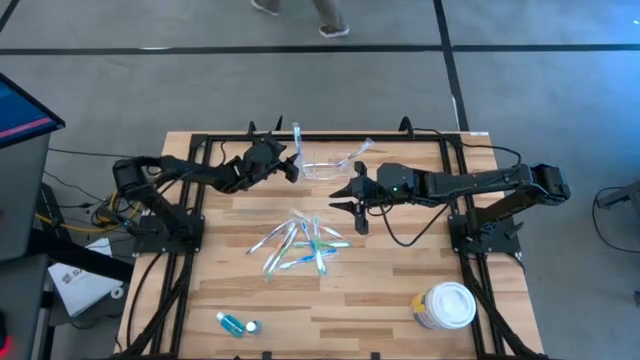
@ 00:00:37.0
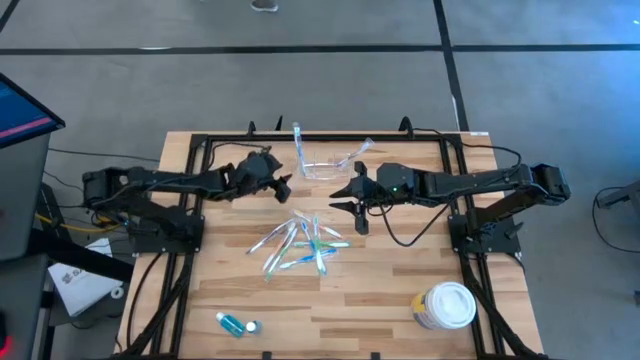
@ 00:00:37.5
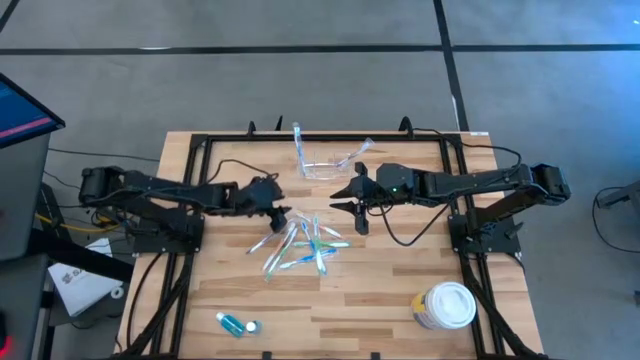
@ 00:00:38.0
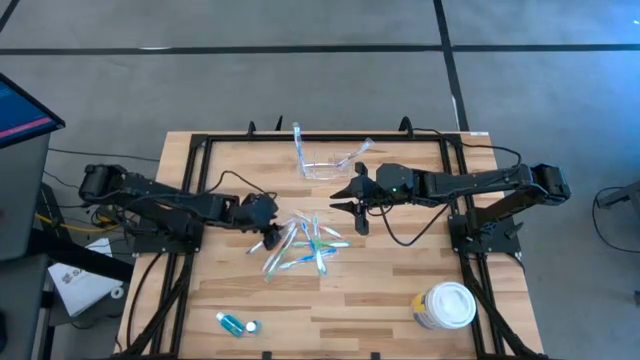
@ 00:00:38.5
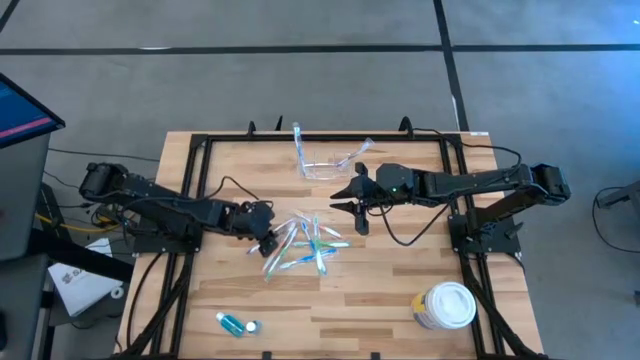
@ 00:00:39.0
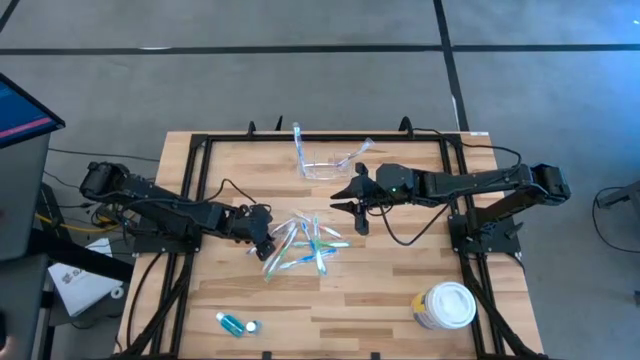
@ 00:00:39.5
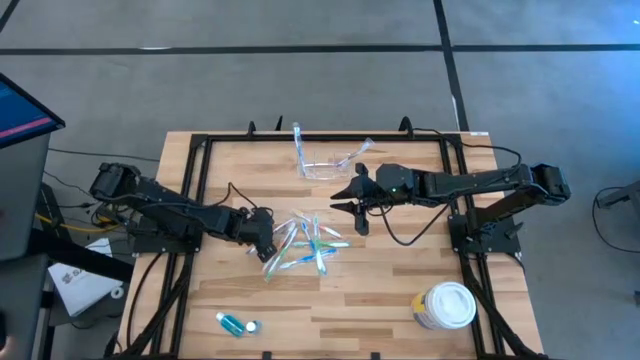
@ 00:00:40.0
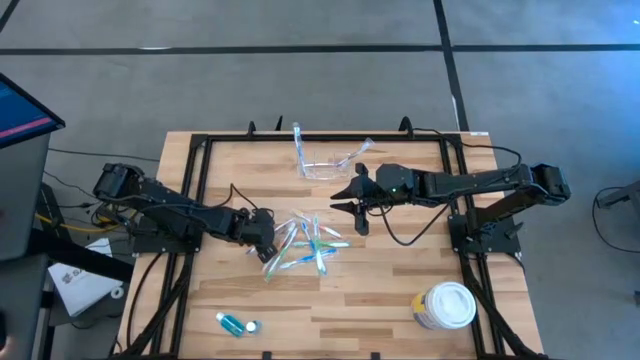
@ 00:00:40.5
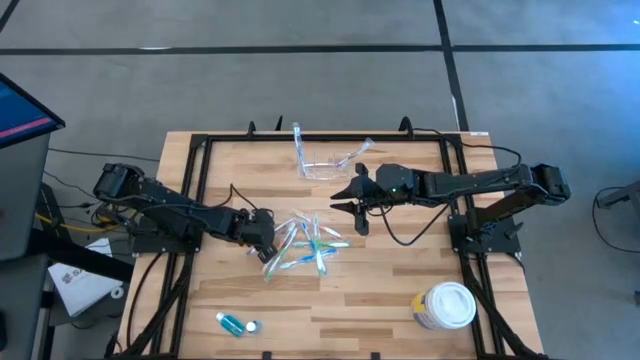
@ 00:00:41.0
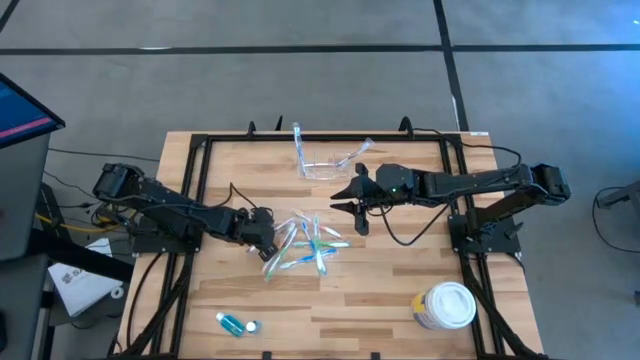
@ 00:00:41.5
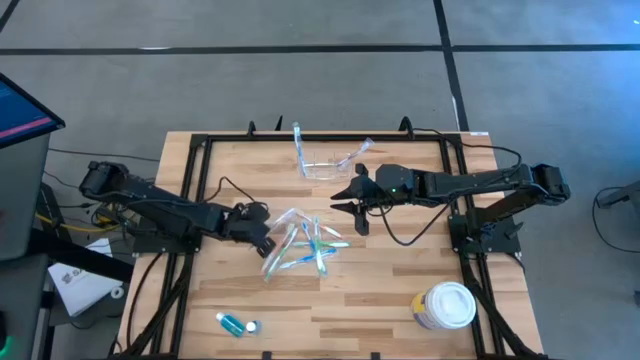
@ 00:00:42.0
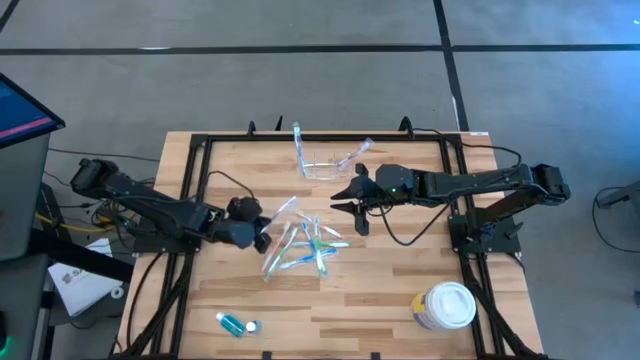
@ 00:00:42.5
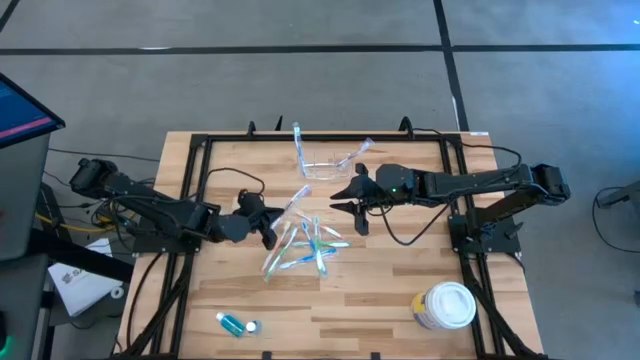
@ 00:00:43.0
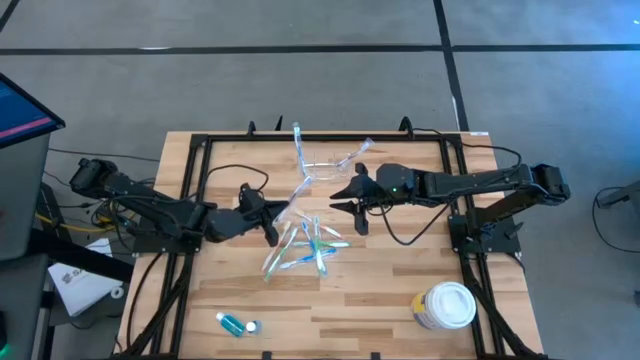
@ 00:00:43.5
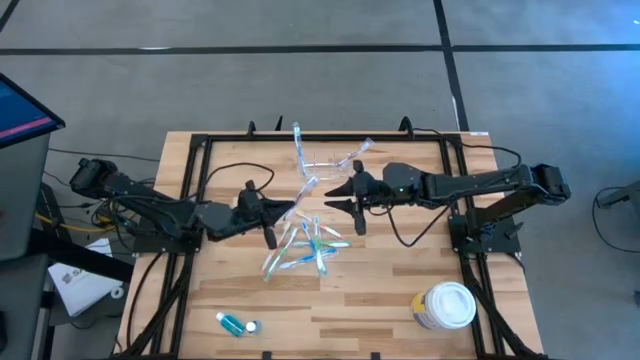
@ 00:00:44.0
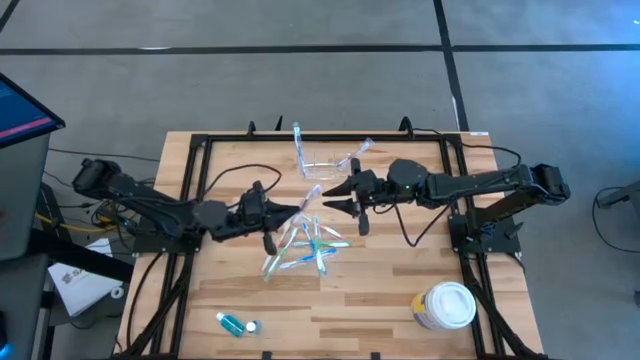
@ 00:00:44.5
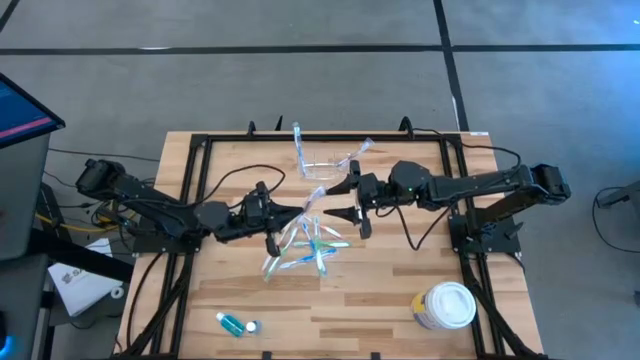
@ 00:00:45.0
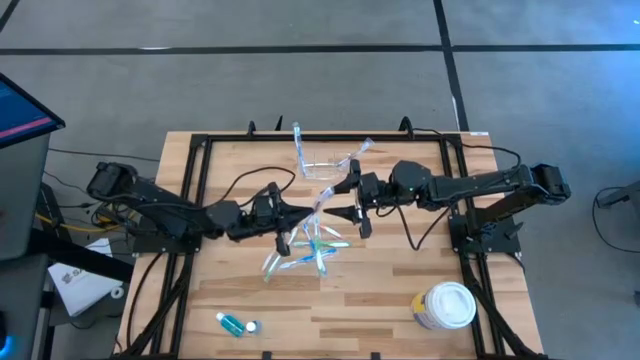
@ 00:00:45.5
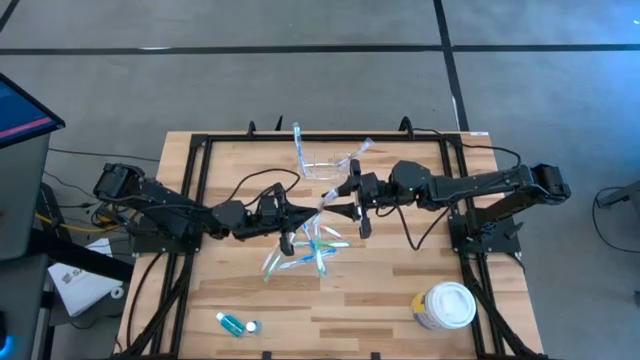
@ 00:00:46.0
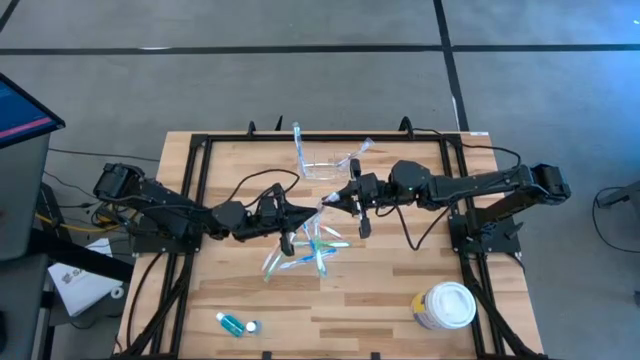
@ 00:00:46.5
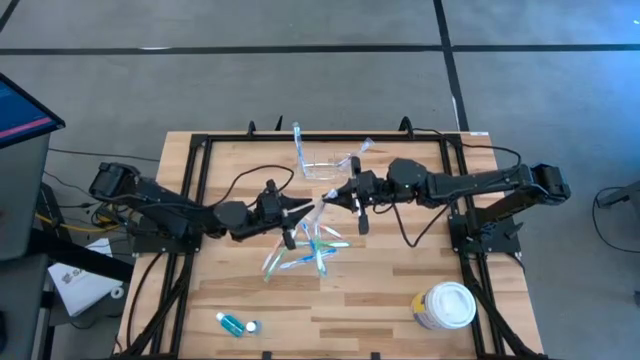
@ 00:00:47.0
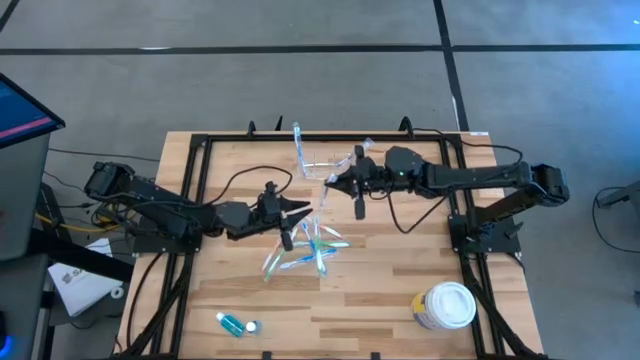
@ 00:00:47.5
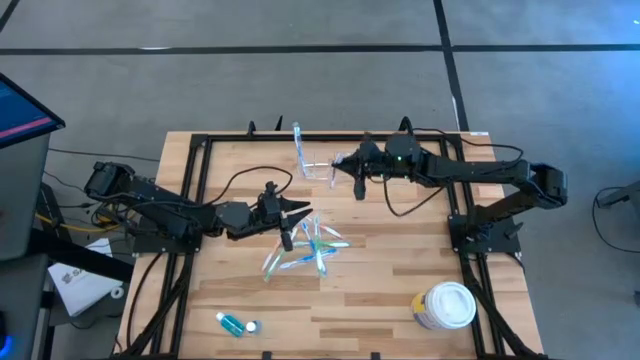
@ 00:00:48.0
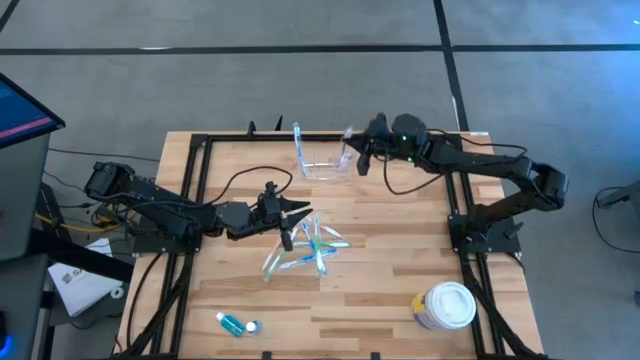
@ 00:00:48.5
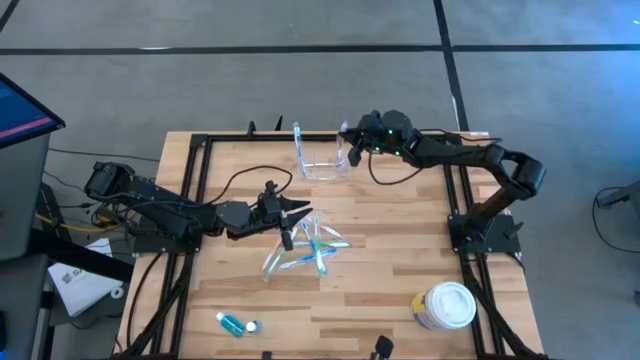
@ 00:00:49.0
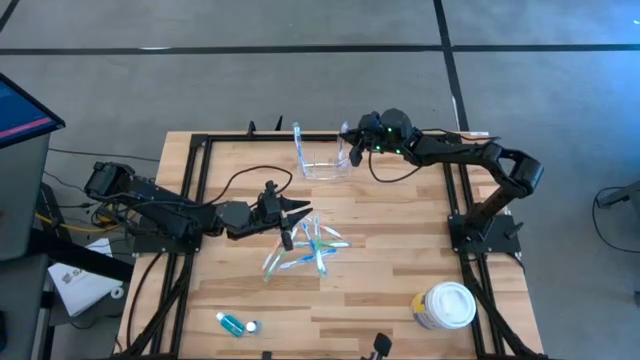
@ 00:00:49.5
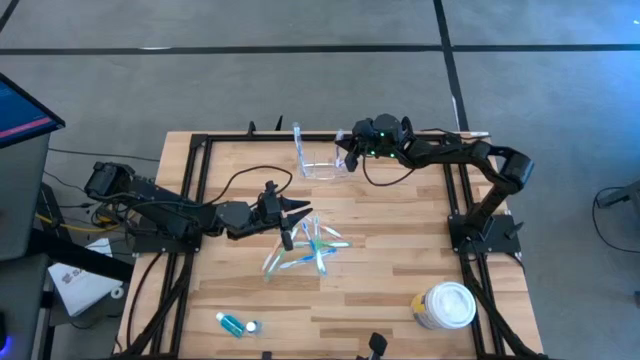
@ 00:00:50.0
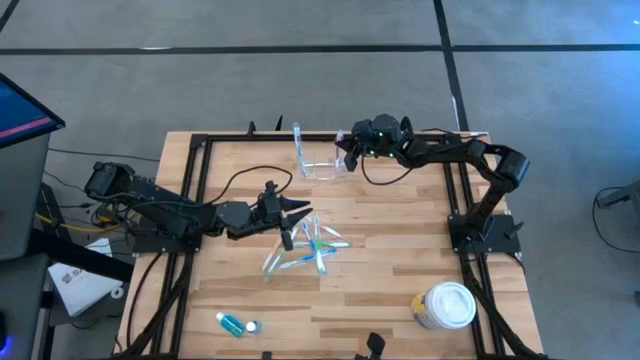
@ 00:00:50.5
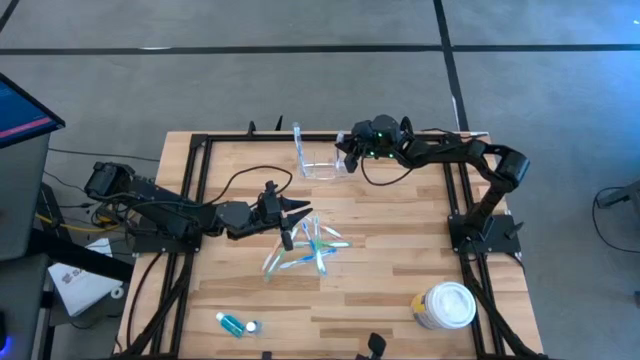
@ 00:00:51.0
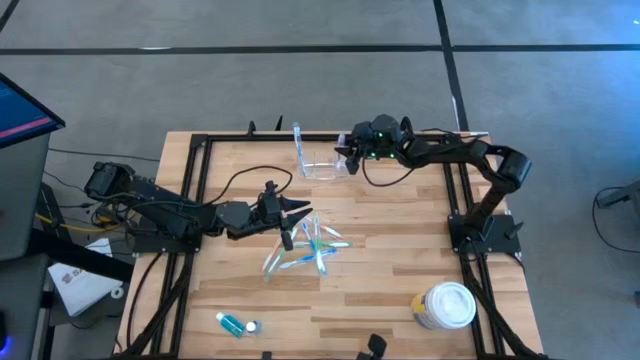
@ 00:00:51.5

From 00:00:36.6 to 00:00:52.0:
Task: Pick & Place toothbrushing station
Put the violet toothbrush into the transparent organizer
